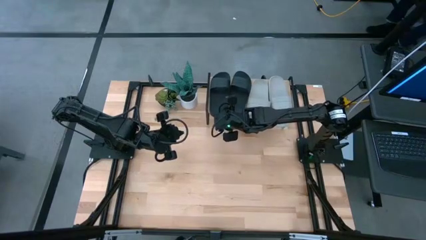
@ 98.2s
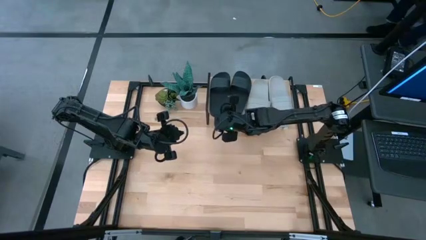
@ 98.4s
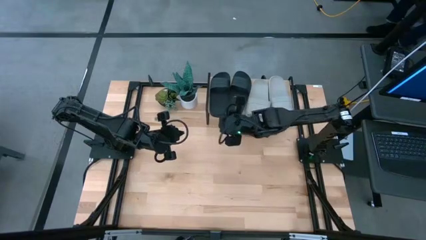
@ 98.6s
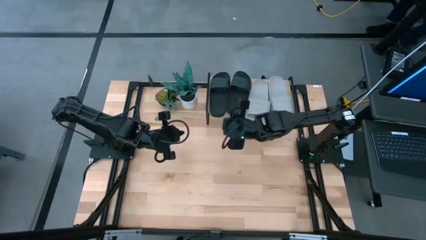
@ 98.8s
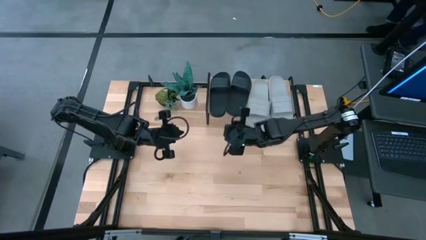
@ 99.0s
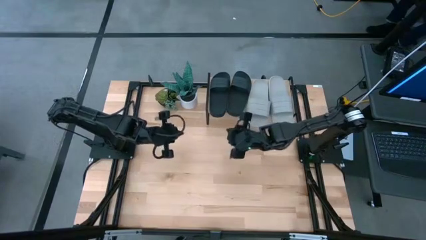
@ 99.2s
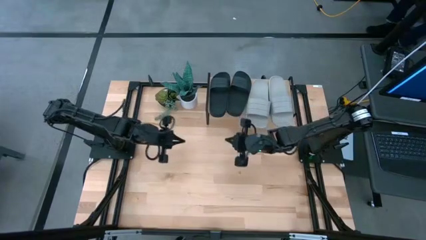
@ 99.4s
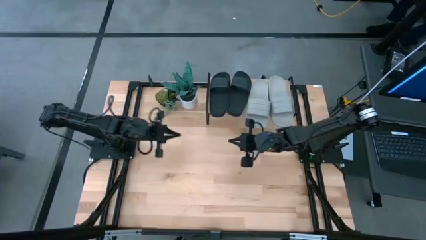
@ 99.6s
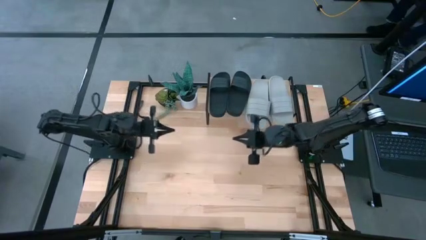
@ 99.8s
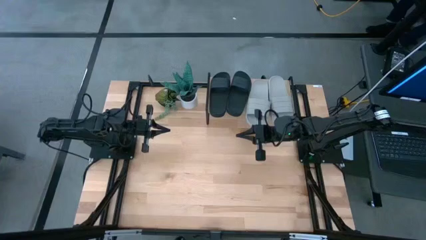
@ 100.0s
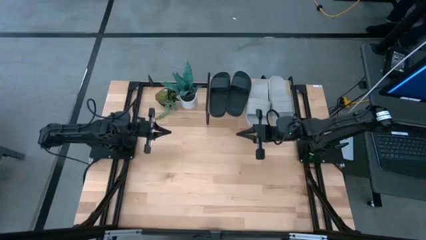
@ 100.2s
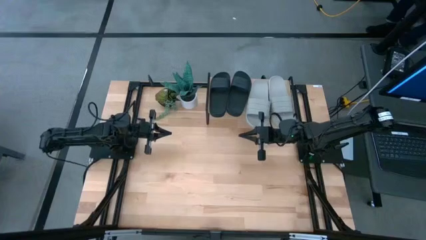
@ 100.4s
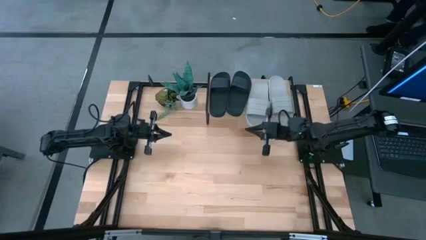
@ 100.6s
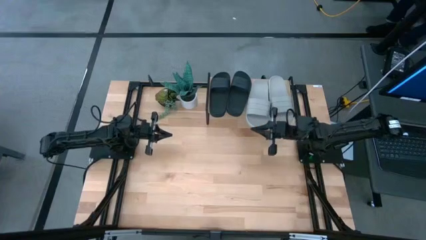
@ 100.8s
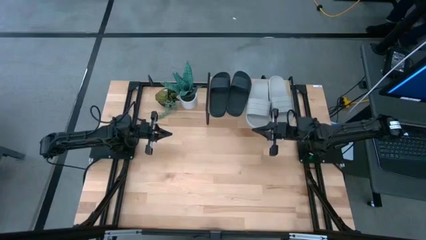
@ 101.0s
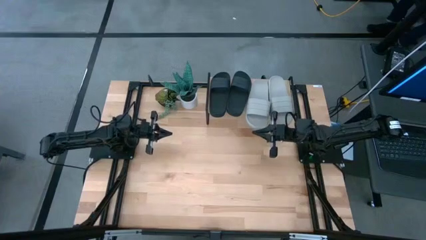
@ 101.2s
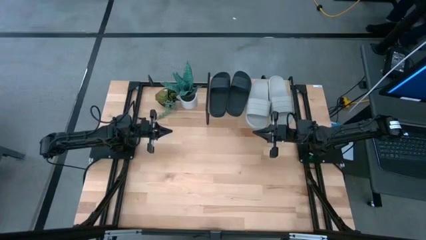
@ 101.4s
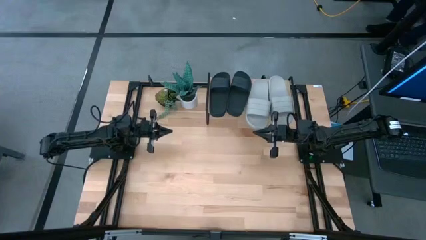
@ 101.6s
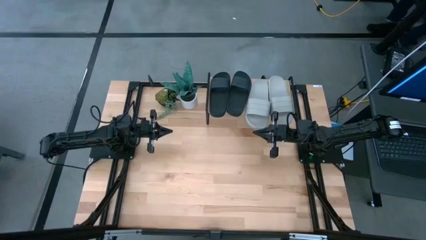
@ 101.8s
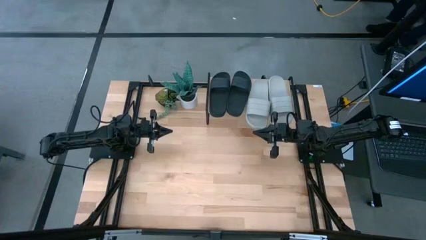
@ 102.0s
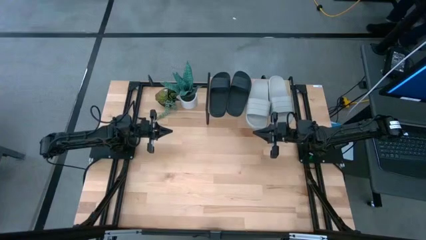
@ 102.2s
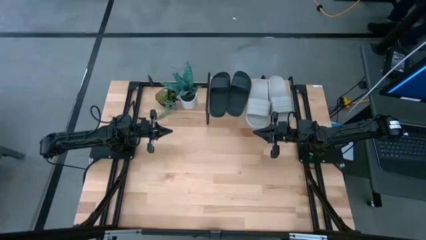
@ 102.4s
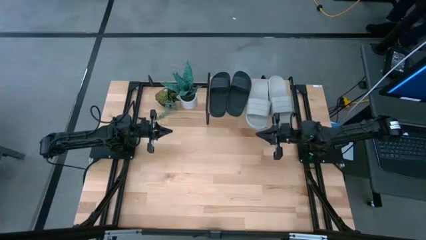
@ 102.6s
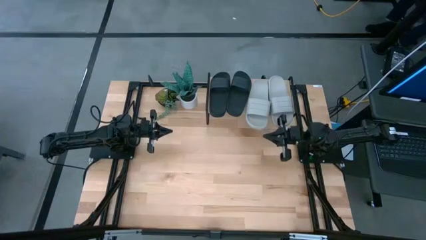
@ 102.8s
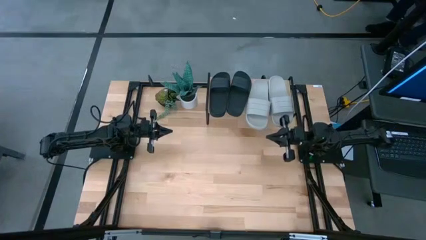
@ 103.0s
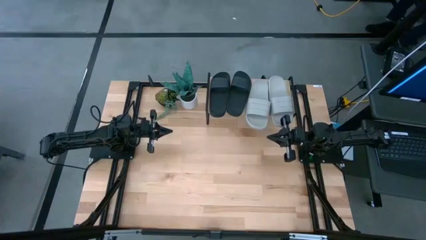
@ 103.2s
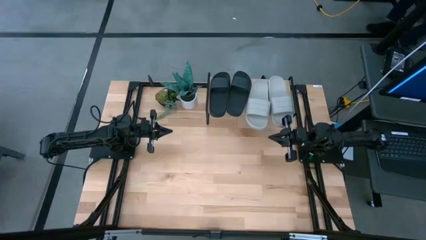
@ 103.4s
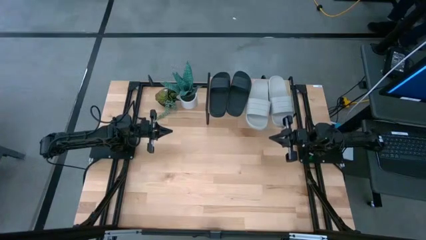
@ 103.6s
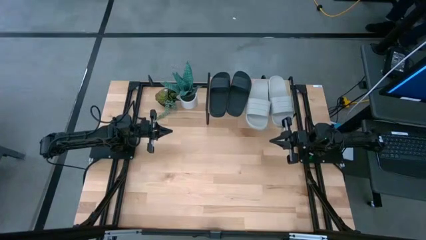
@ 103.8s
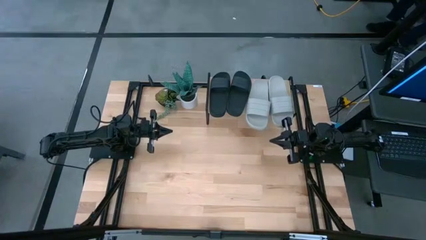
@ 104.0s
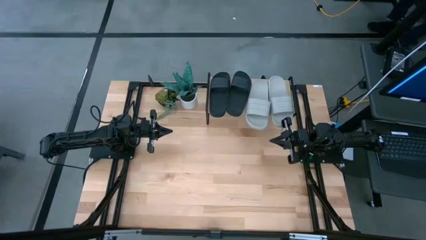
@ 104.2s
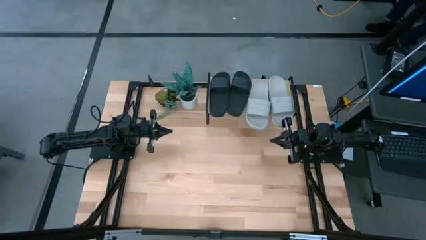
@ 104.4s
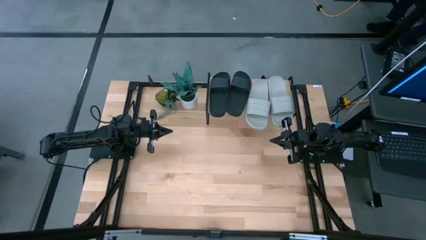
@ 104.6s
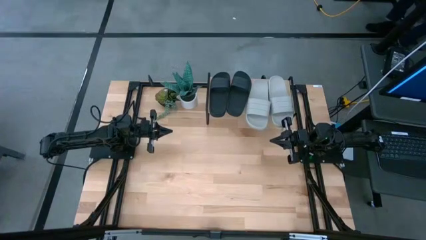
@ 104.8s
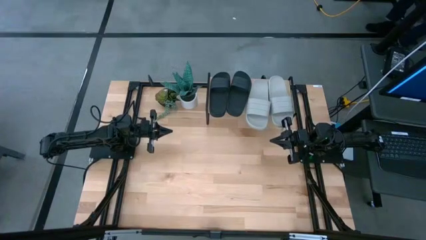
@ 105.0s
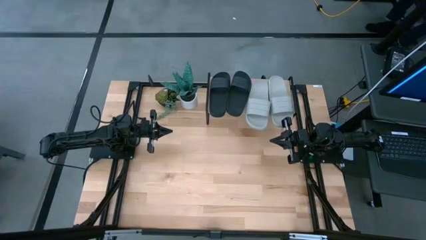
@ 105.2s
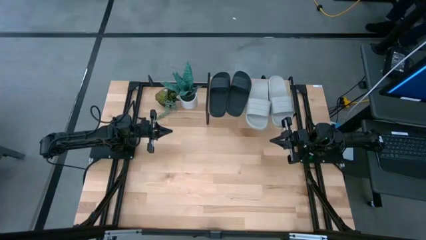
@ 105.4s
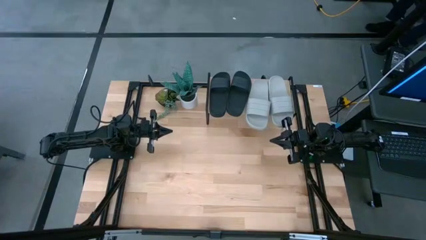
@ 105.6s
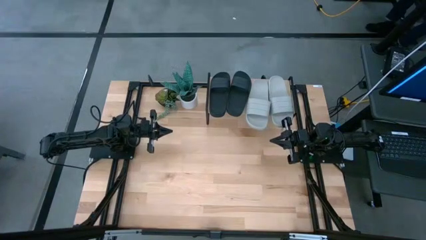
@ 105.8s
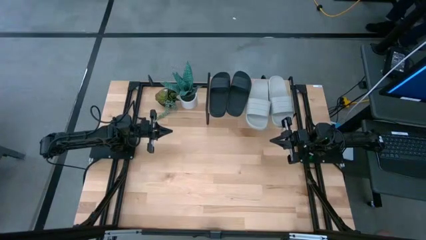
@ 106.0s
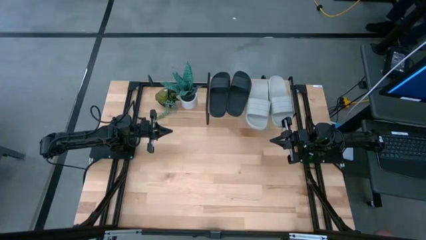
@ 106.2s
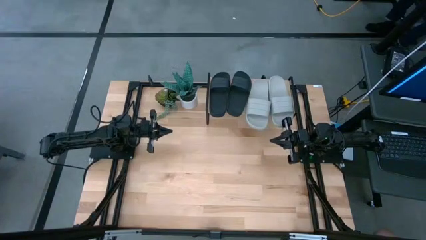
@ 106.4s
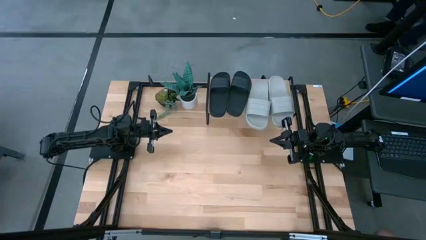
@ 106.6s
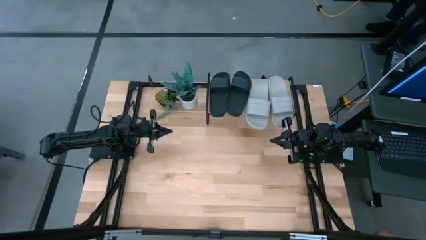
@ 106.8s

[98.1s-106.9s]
Task: Pick and place slides into the shelf
Return to Home Position

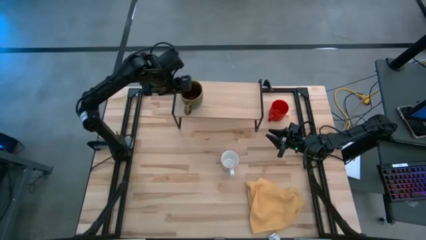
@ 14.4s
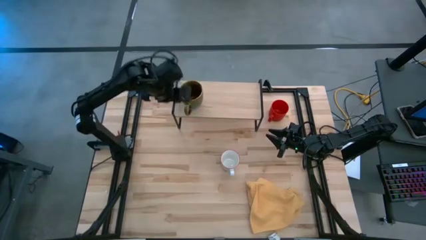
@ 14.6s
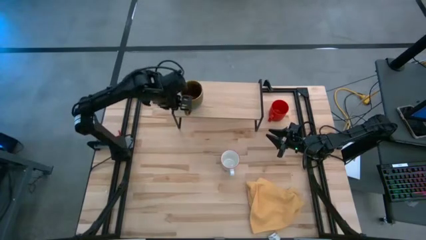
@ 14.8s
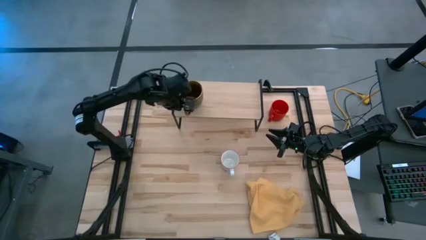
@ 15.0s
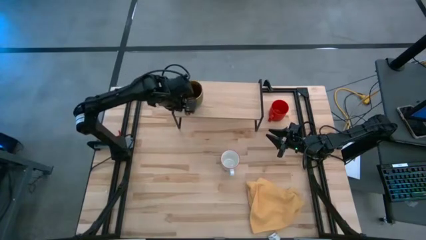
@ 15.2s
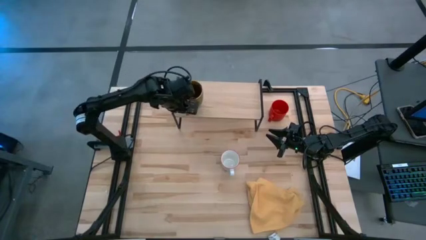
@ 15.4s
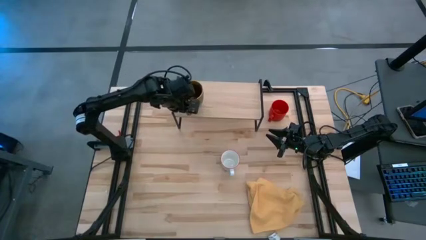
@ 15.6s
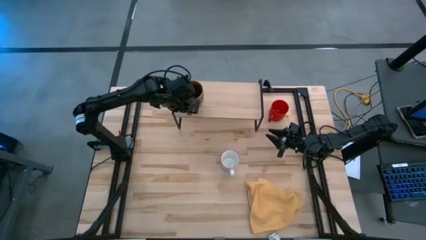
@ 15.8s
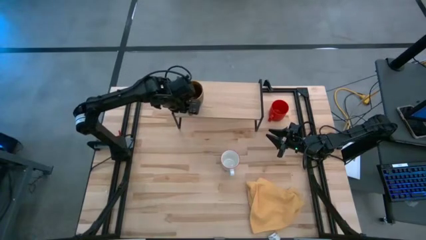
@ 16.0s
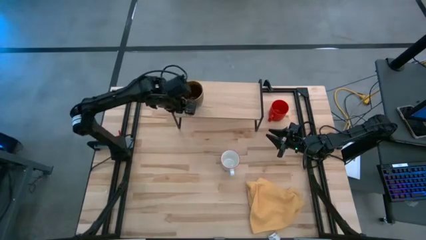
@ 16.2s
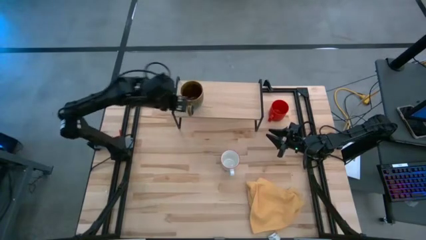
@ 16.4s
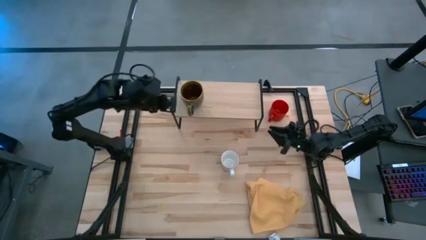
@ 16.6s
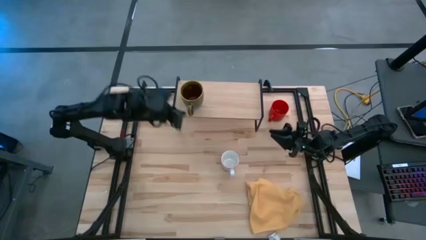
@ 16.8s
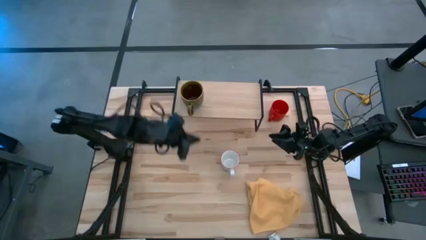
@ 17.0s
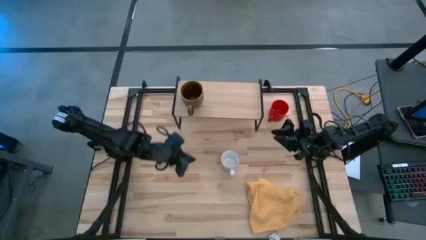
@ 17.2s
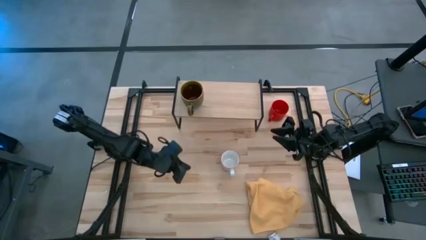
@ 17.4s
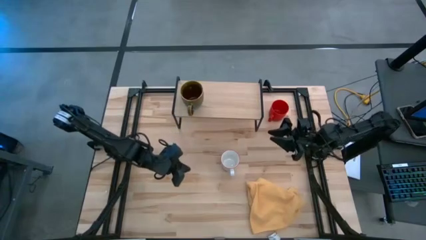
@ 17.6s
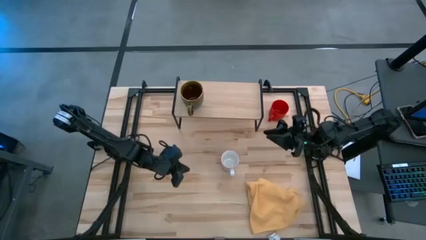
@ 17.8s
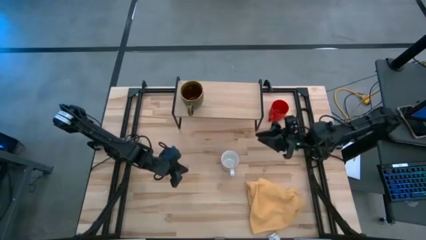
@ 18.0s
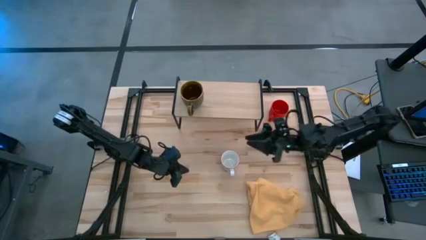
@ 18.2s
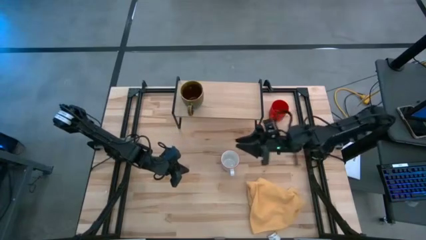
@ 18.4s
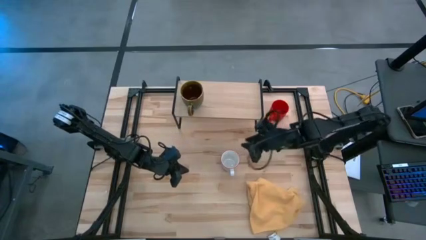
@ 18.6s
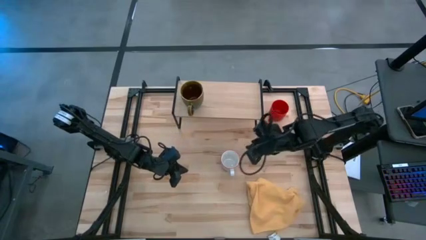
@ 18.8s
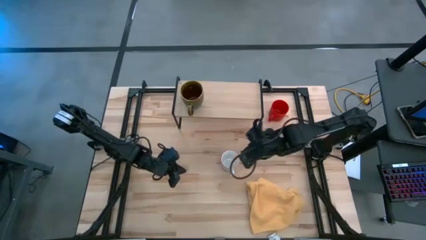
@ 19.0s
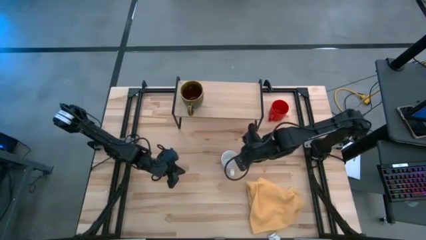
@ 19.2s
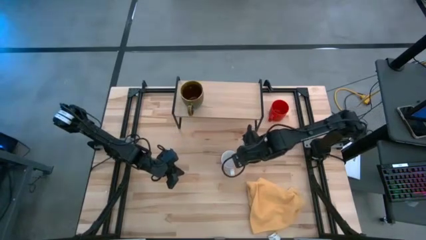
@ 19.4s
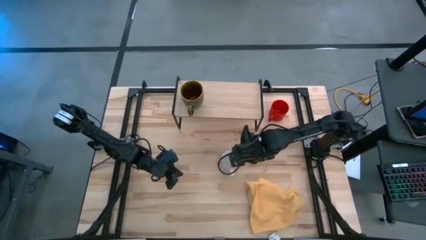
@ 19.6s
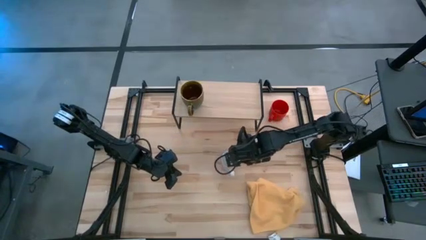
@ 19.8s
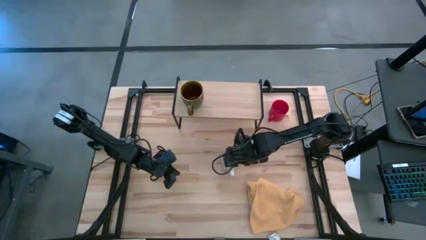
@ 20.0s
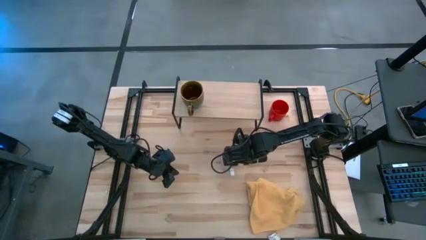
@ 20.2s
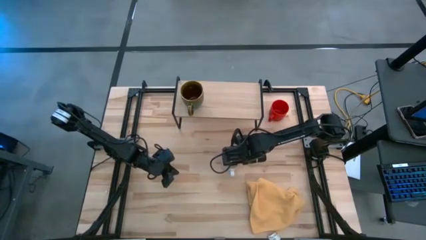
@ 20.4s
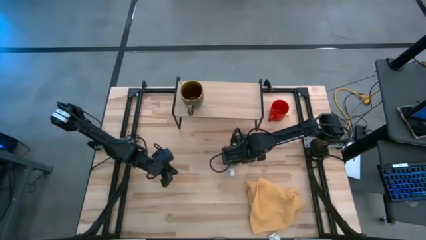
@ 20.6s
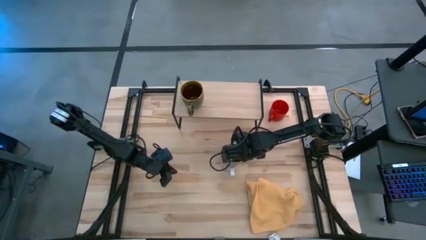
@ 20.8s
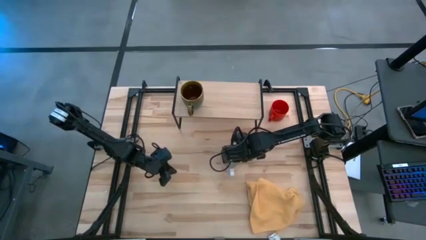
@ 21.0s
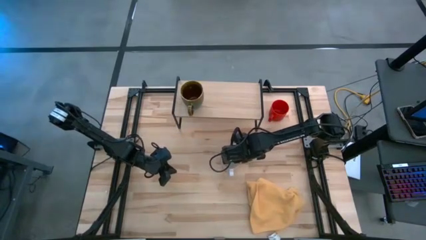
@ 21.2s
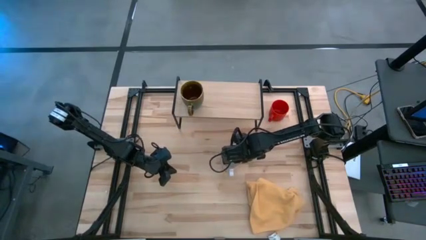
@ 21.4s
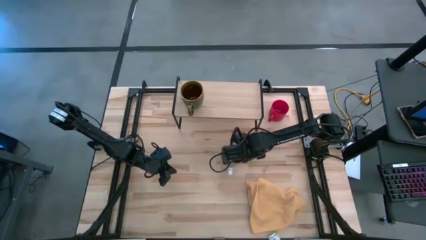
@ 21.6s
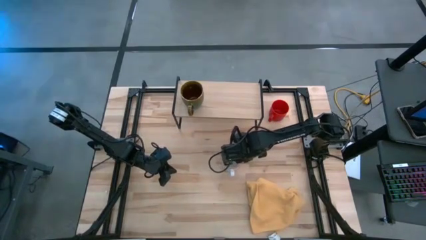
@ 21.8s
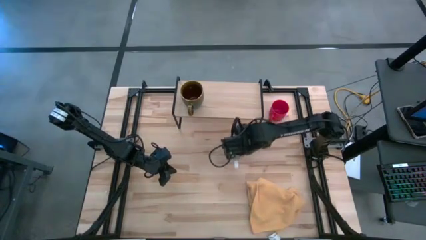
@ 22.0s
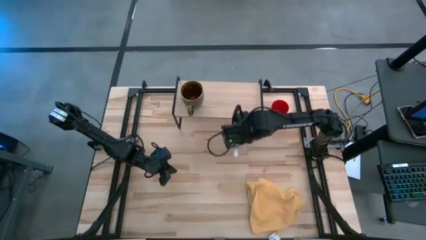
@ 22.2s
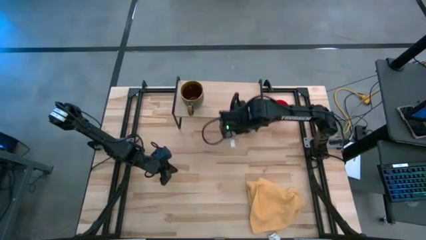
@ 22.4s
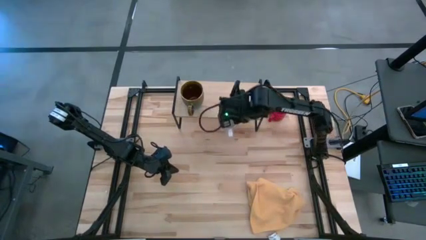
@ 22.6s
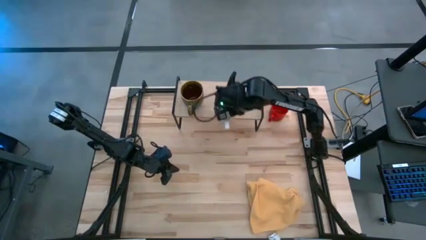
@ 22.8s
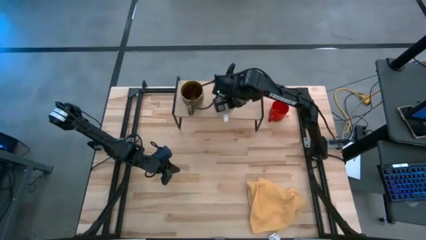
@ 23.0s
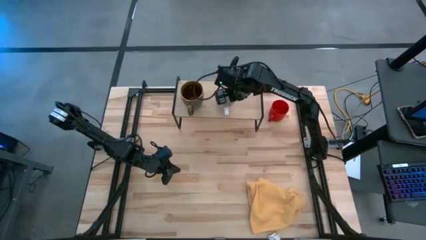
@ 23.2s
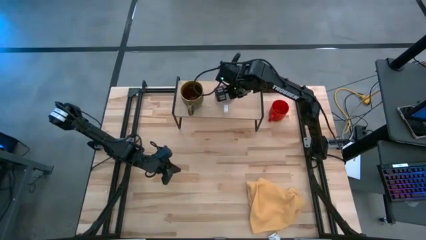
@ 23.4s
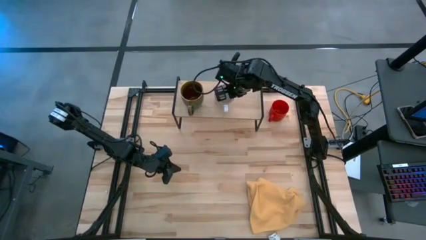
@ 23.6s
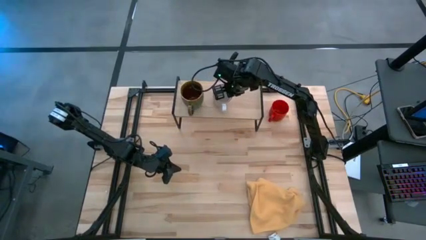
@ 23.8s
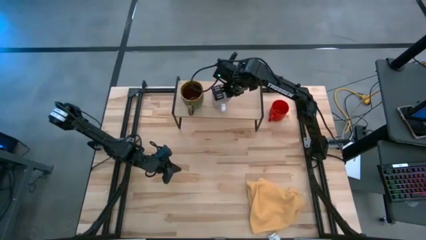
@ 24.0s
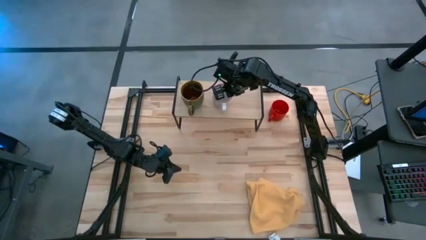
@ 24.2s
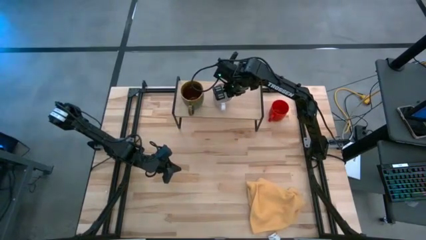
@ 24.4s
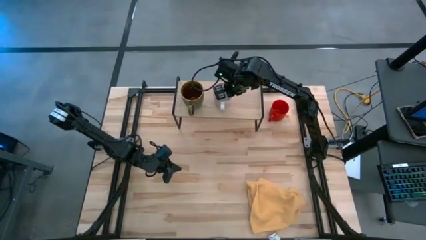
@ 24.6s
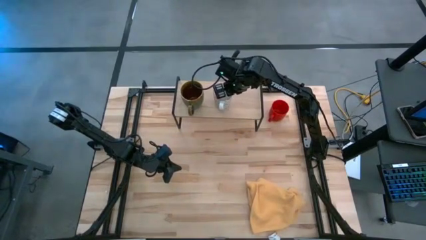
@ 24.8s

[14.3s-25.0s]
Task: Stack small to large cups/mugs on shelf
Put the white mug on the shelf
